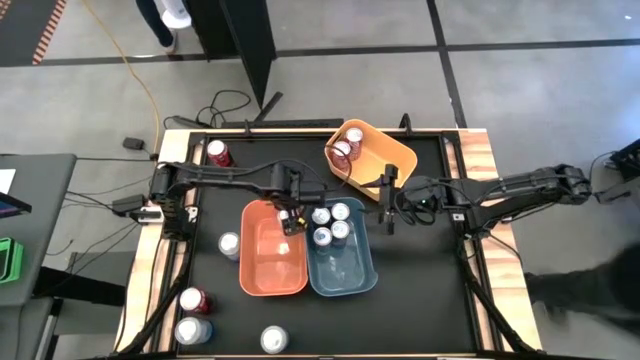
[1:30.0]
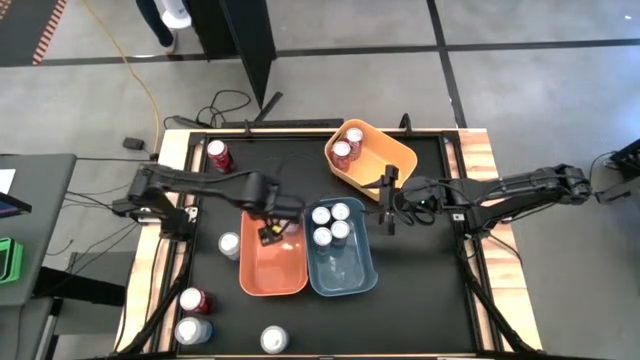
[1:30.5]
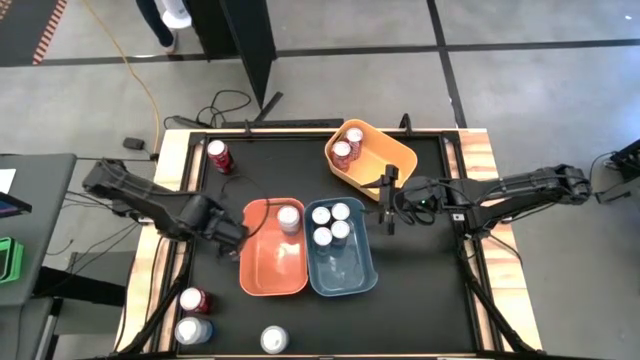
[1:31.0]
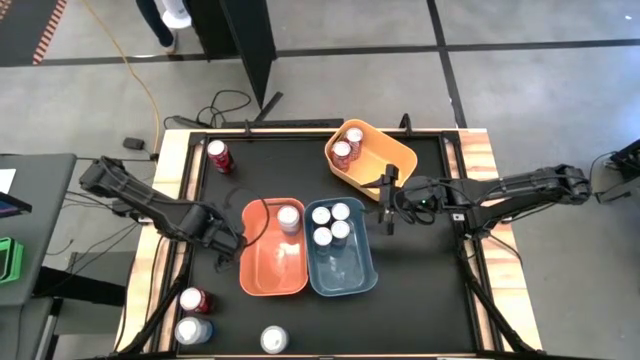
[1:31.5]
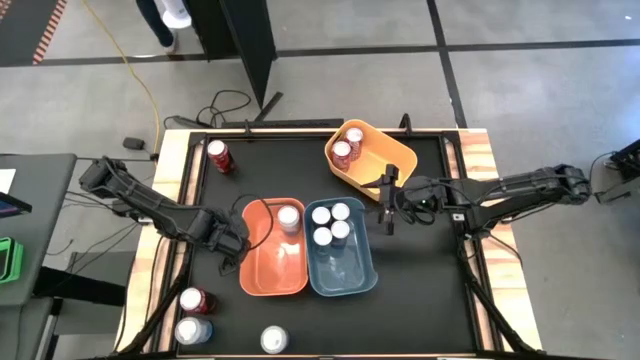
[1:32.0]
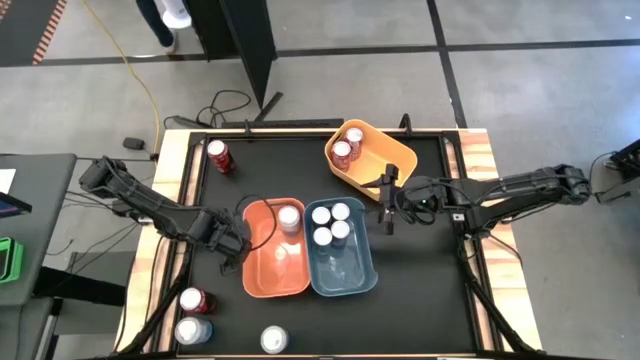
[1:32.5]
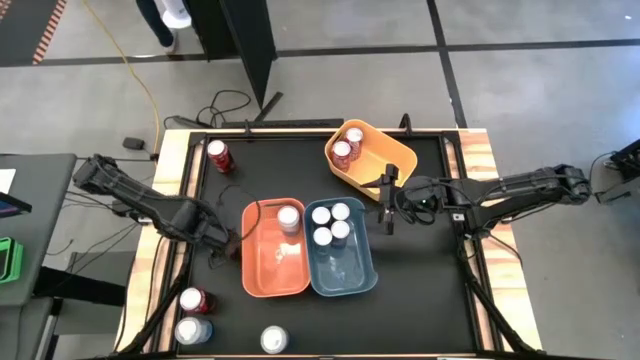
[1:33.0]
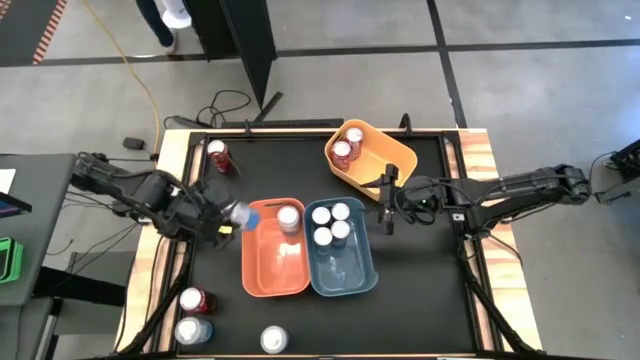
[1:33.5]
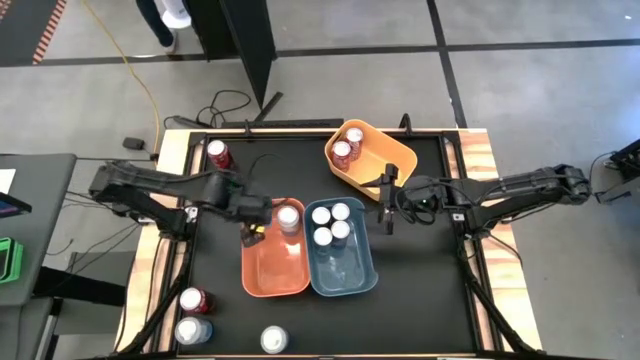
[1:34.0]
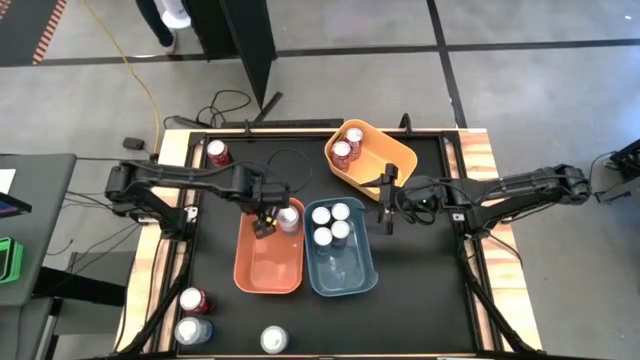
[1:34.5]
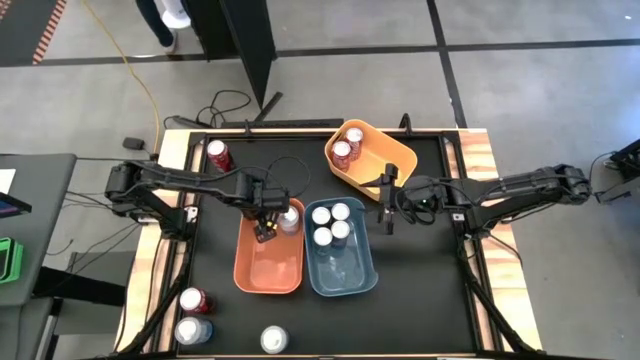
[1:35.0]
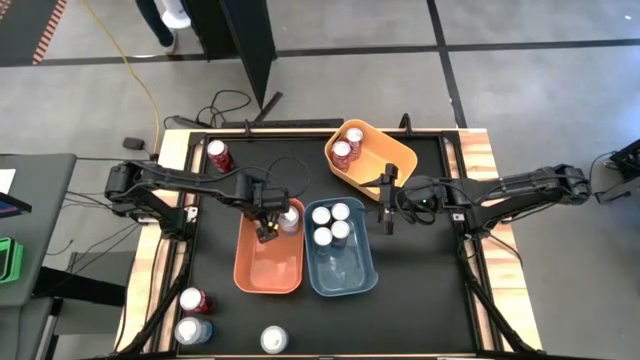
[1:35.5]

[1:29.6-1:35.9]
Task: Sort soda cans
Put the top blue and white soda can into the orange

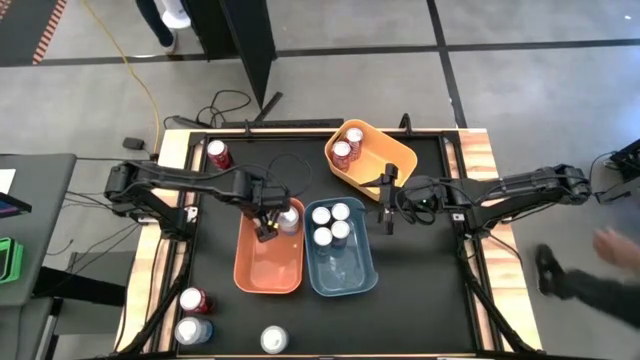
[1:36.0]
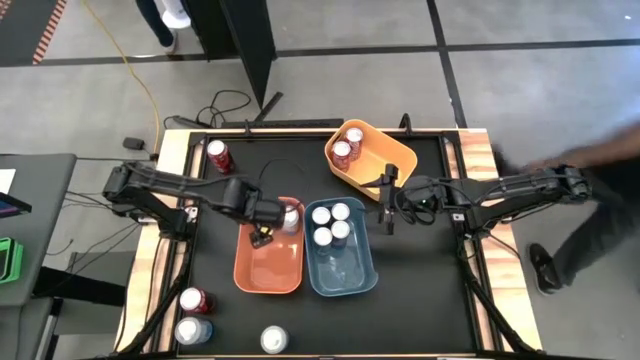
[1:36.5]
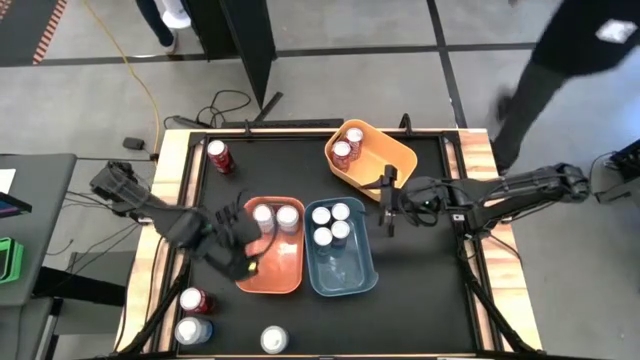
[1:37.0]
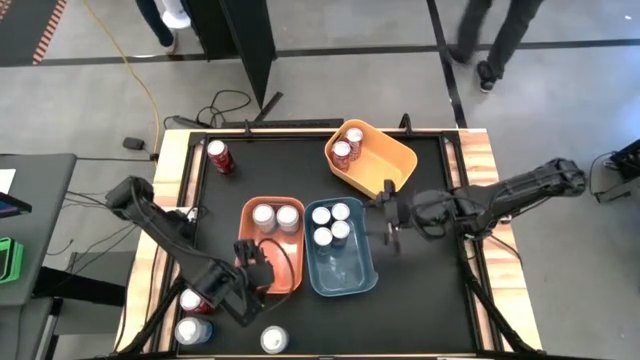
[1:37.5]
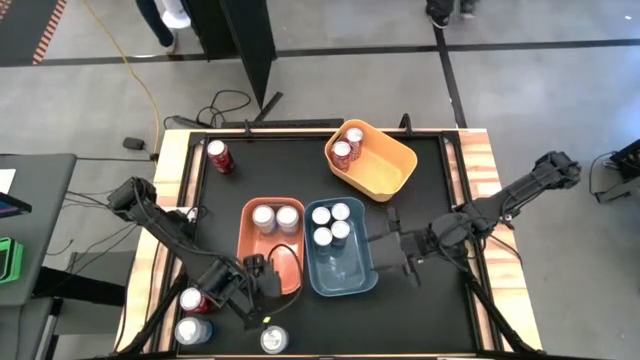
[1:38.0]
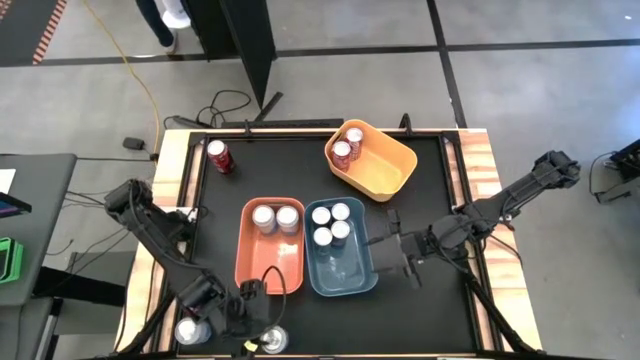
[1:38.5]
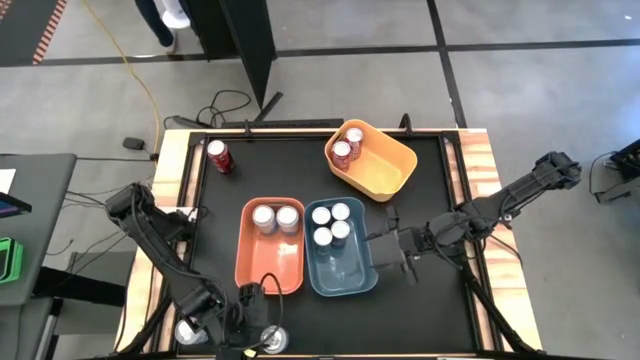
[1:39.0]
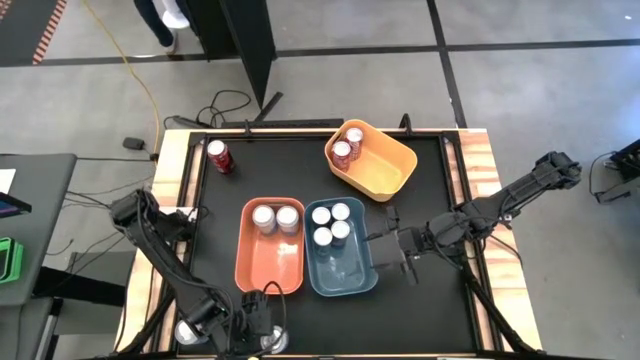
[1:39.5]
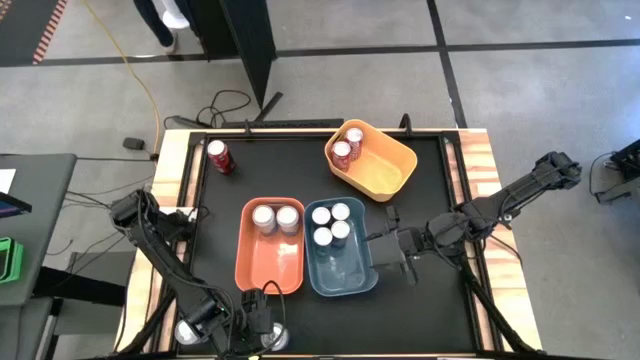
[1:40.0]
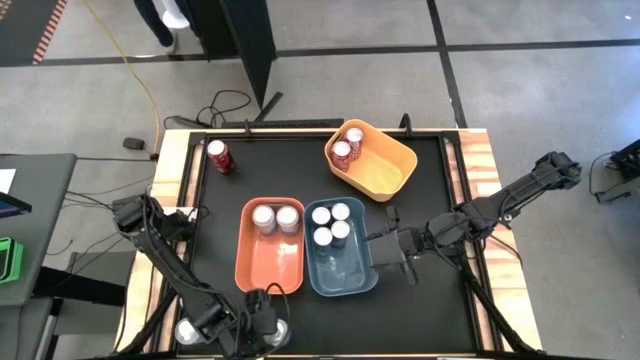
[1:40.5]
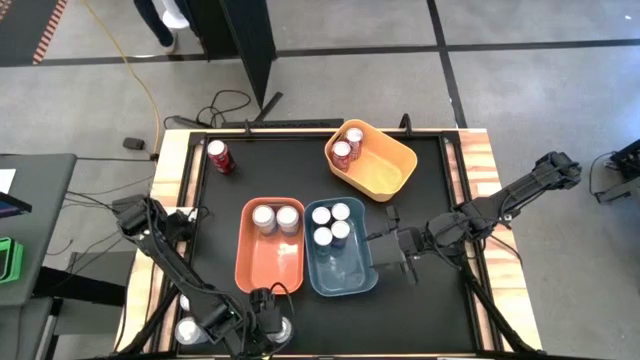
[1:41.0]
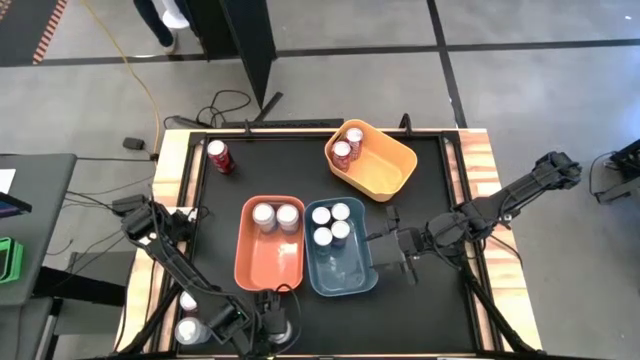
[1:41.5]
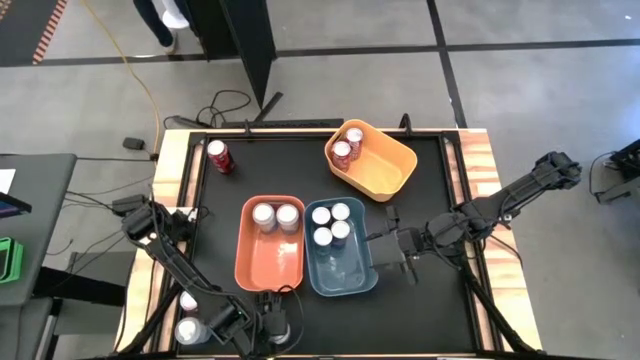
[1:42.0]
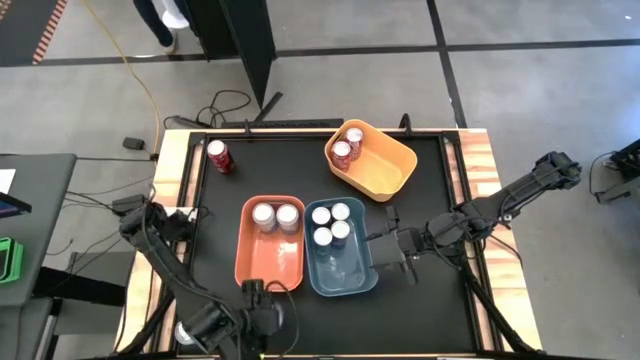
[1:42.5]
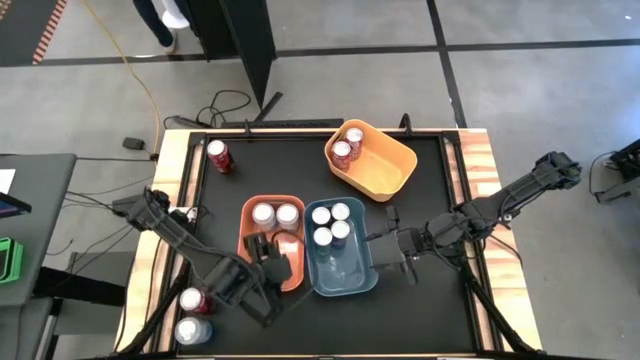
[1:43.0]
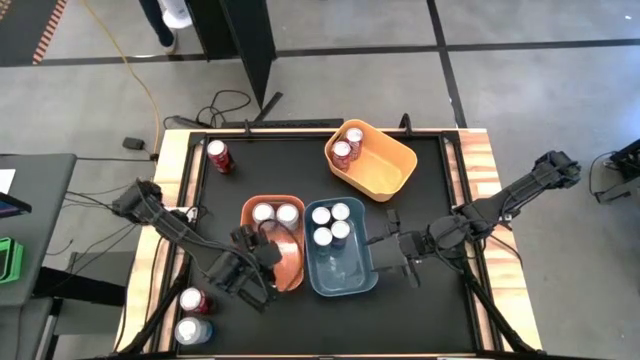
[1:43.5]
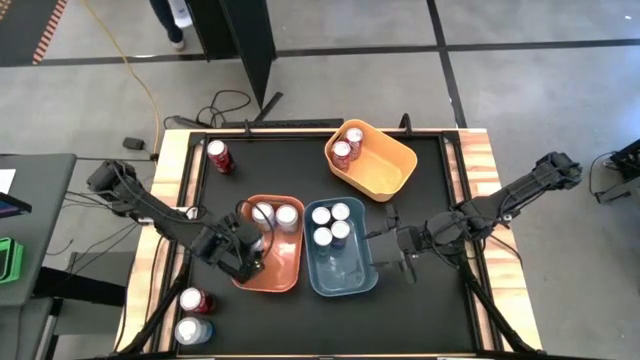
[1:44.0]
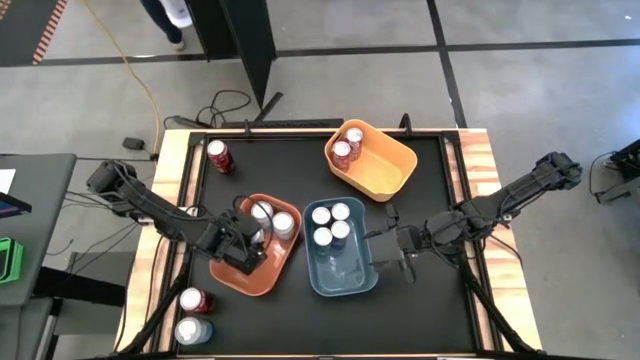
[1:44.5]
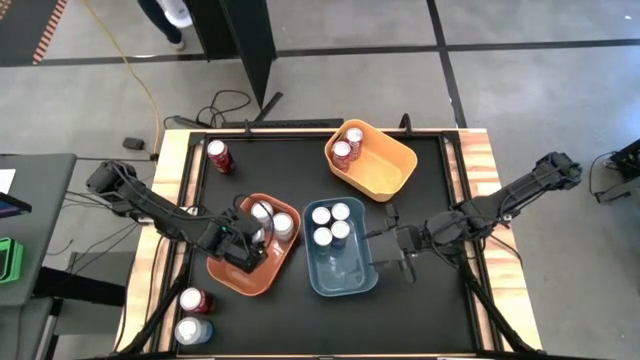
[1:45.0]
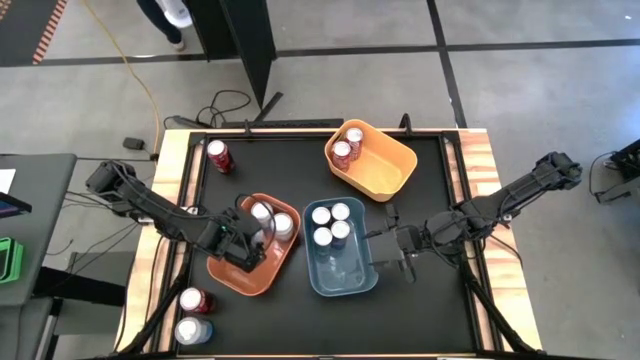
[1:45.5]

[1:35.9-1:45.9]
Put the right blue and white soda can into the orange bin

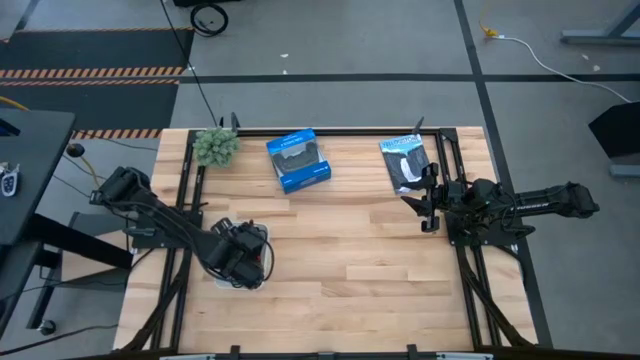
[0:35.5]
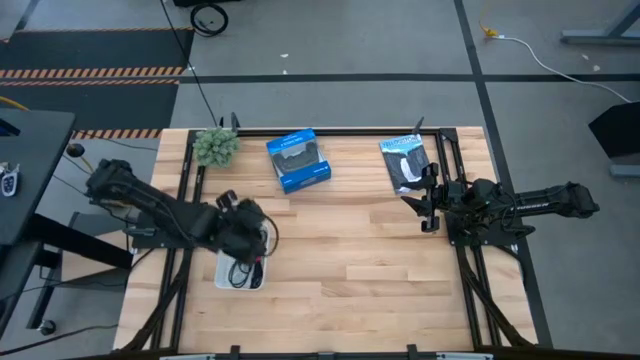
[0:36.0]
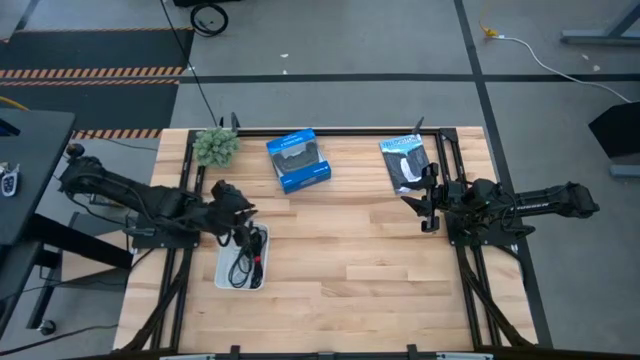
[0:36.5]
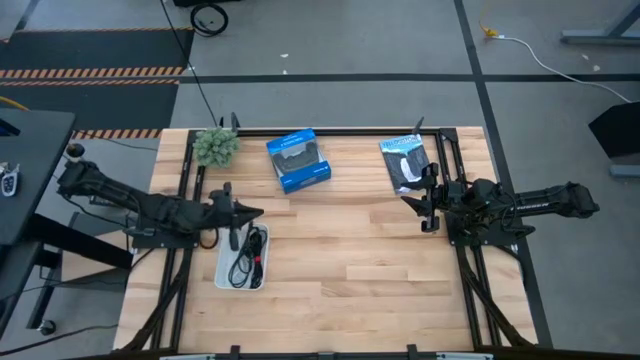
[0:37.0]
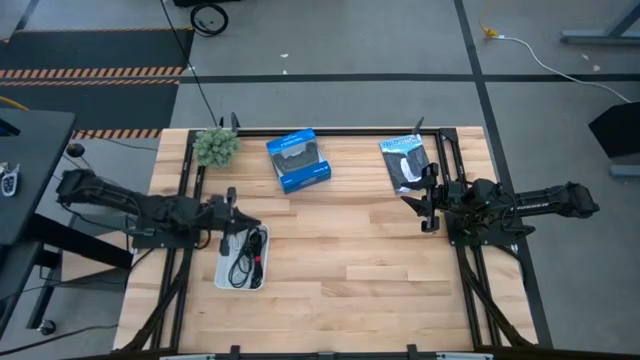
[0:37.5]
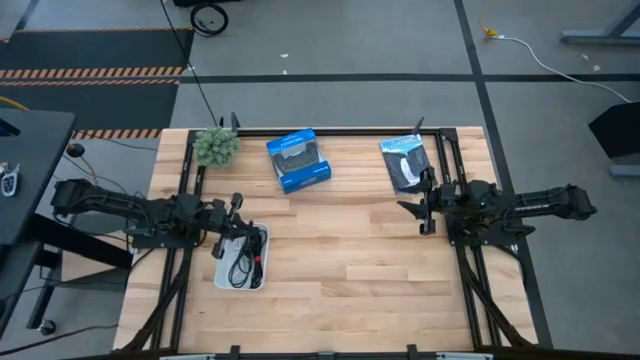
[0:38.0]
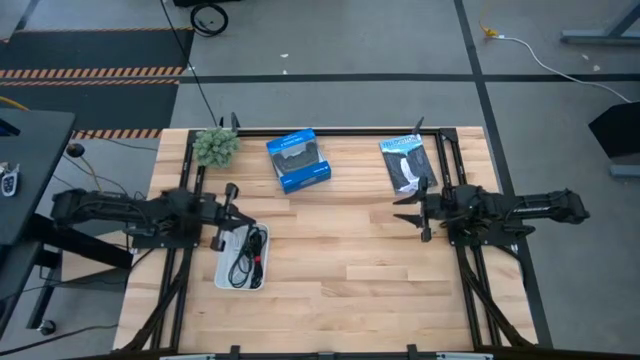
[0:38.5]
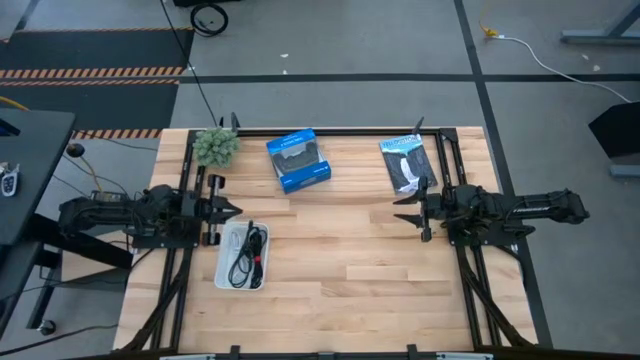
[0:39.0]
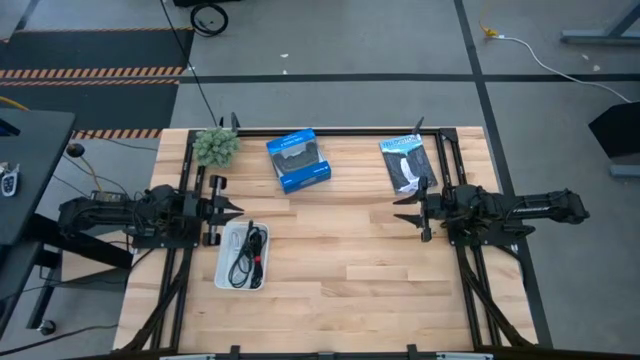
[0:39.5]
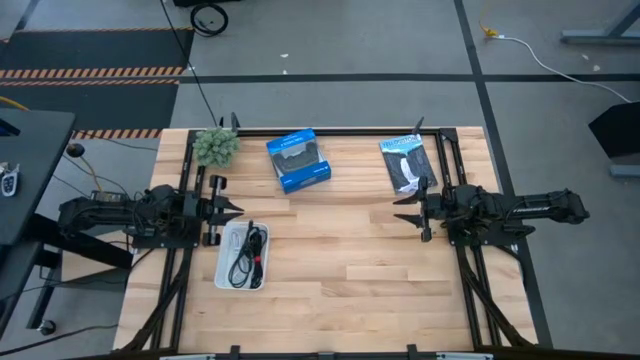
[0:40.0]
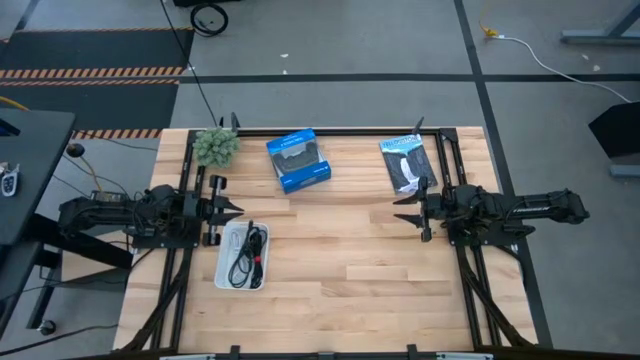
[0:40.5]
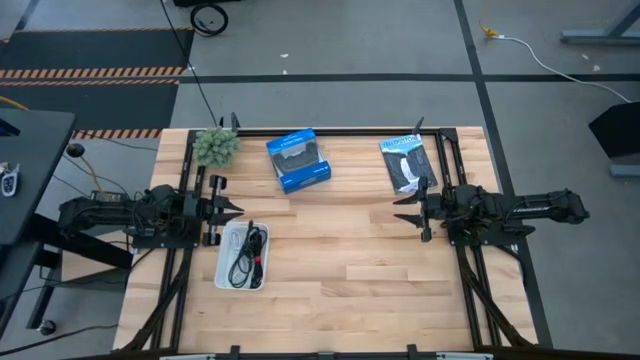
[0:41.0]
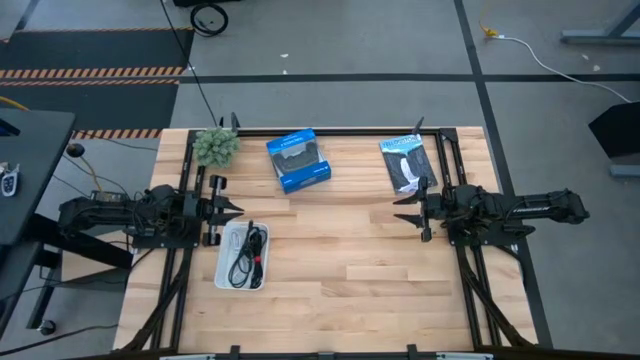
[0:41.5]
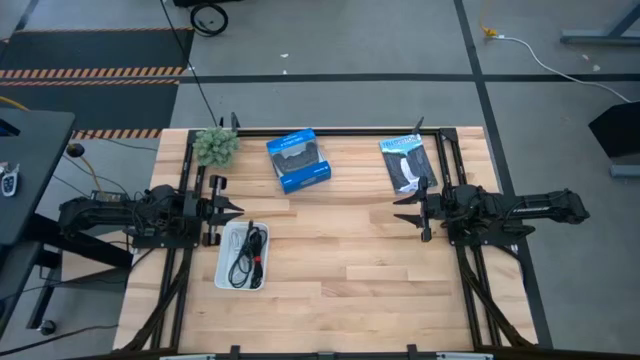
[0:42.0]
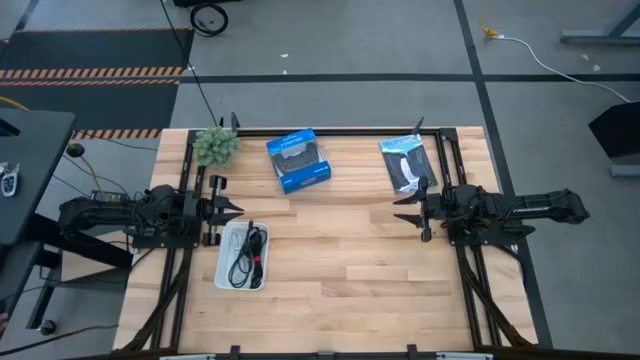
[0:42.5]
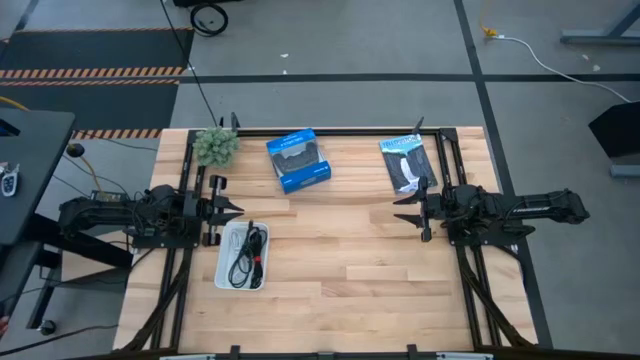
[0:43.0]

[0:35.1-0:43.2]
Task: Pick and place USB-C Cables
Return to Home Position
